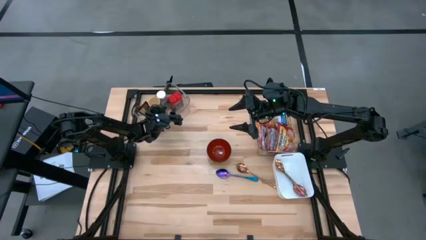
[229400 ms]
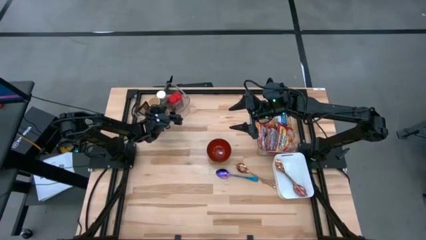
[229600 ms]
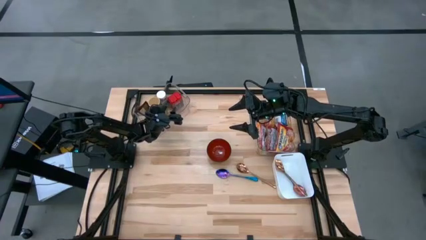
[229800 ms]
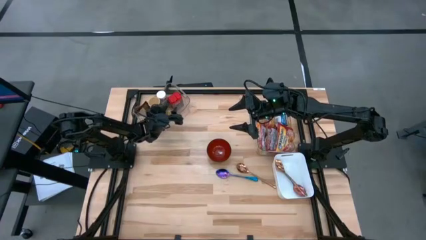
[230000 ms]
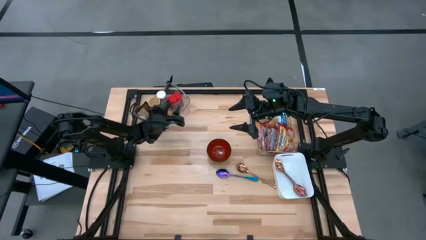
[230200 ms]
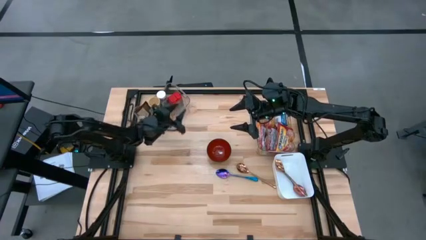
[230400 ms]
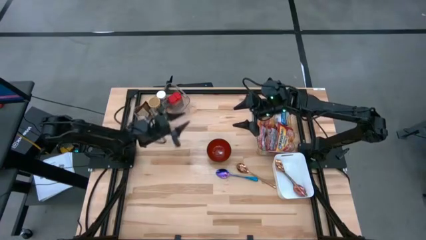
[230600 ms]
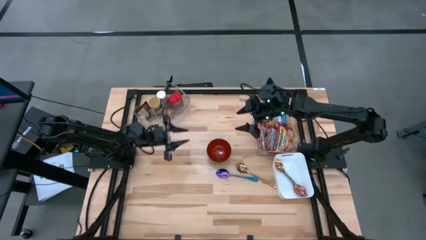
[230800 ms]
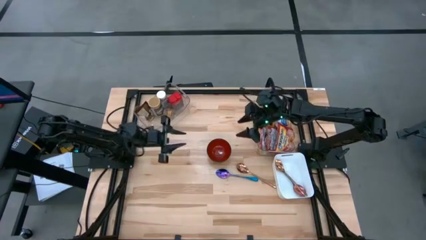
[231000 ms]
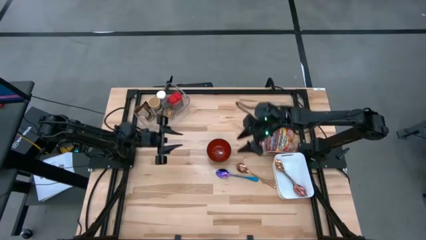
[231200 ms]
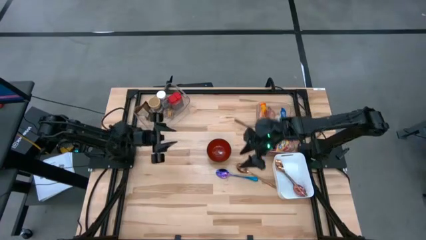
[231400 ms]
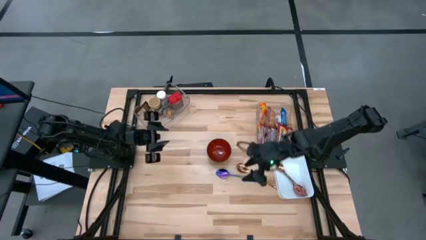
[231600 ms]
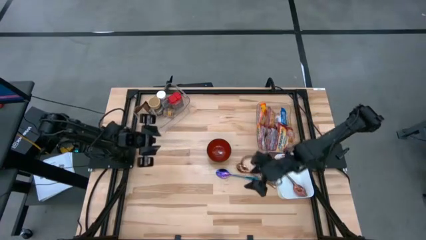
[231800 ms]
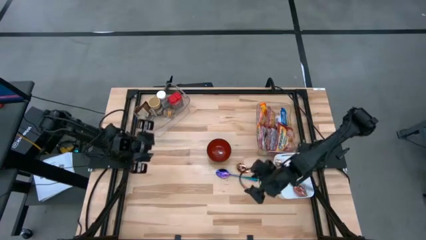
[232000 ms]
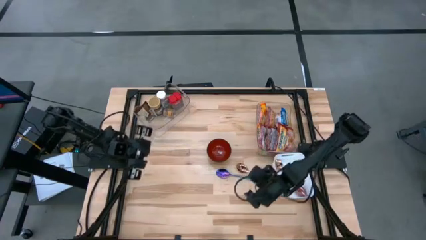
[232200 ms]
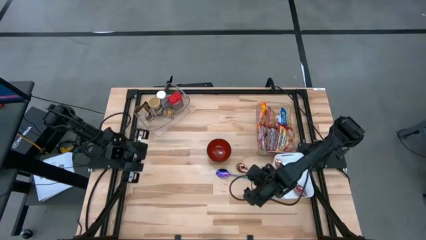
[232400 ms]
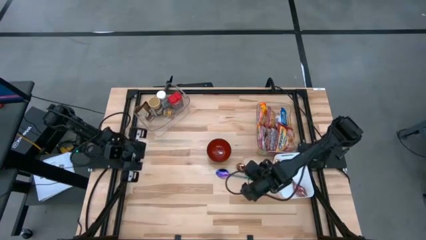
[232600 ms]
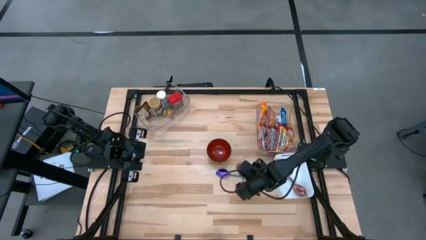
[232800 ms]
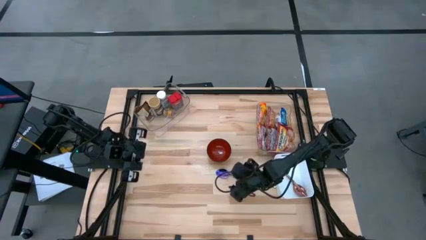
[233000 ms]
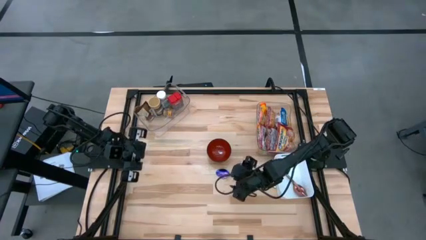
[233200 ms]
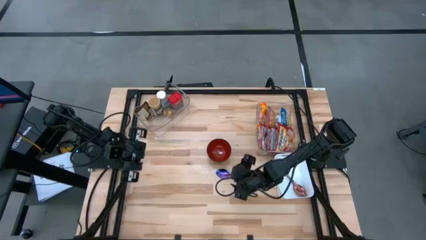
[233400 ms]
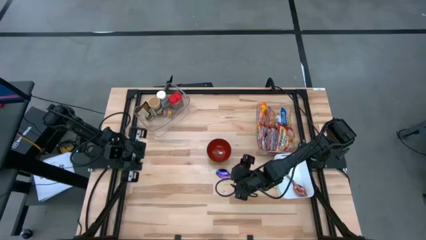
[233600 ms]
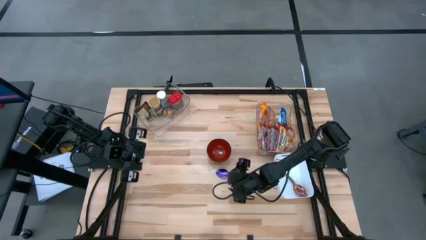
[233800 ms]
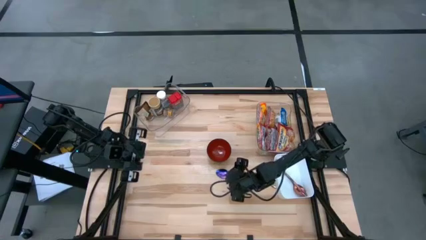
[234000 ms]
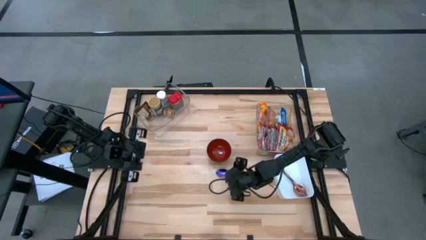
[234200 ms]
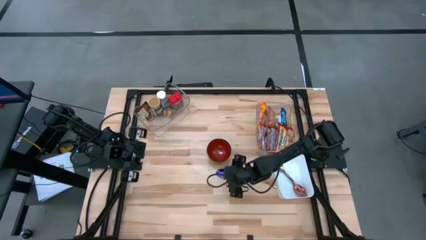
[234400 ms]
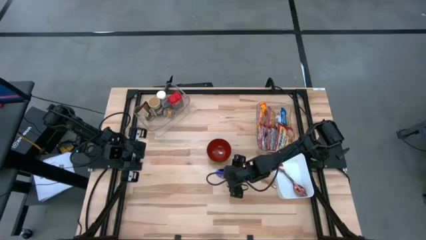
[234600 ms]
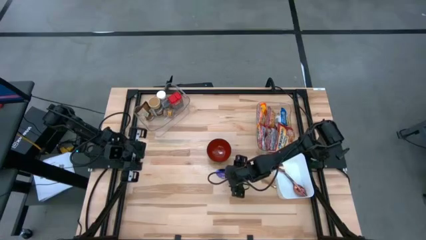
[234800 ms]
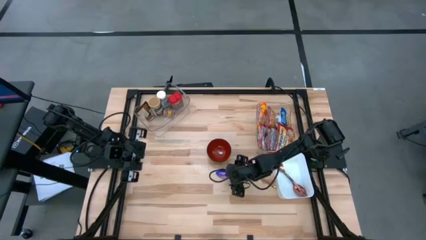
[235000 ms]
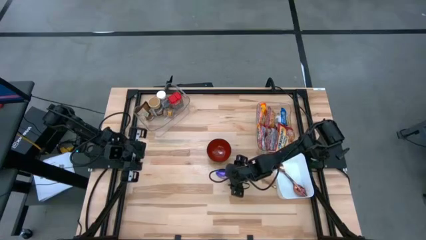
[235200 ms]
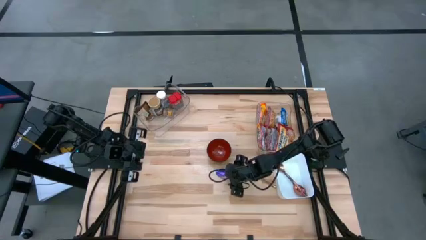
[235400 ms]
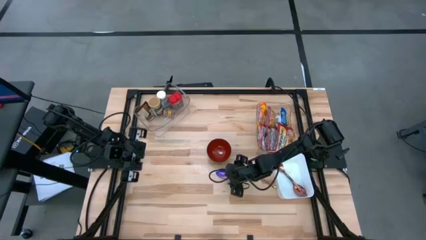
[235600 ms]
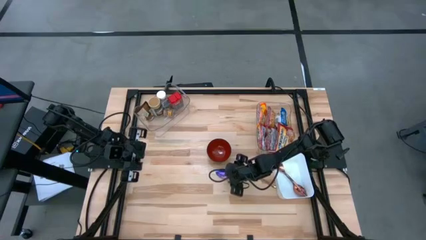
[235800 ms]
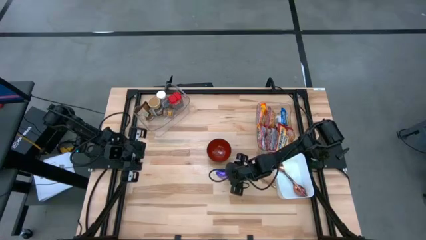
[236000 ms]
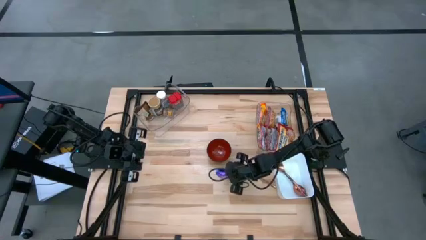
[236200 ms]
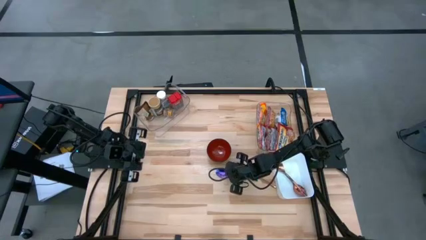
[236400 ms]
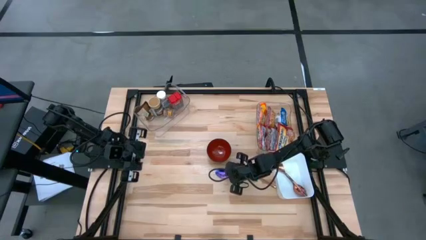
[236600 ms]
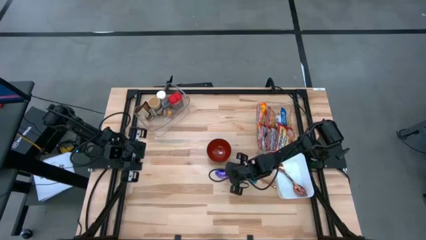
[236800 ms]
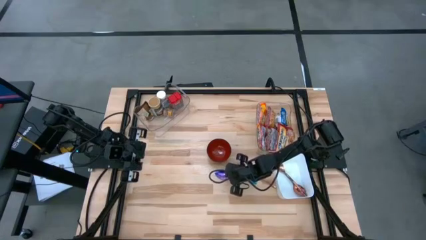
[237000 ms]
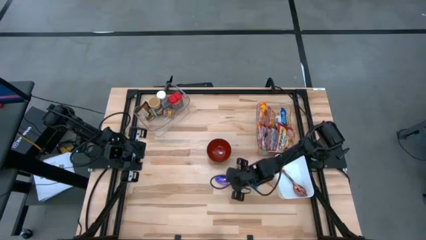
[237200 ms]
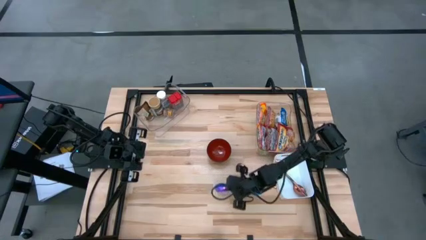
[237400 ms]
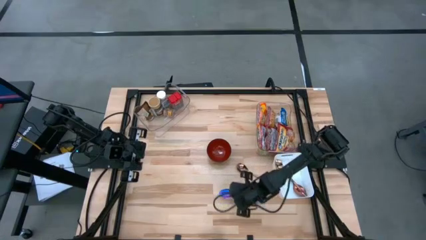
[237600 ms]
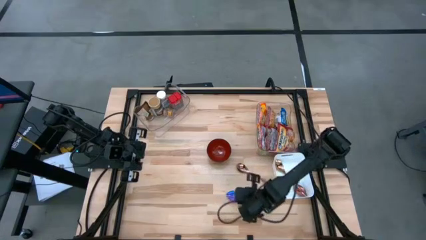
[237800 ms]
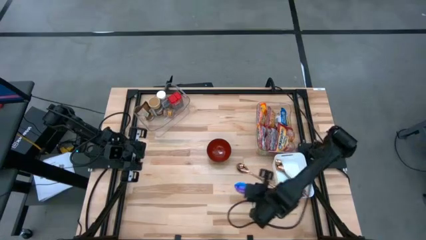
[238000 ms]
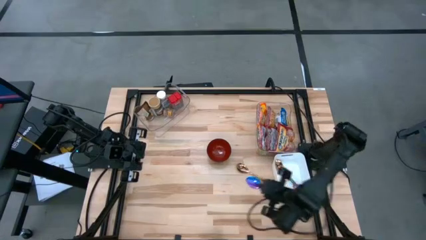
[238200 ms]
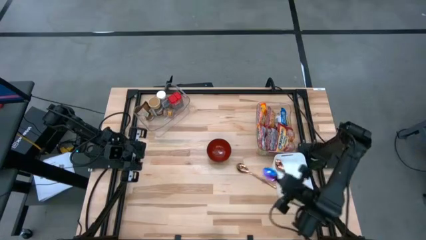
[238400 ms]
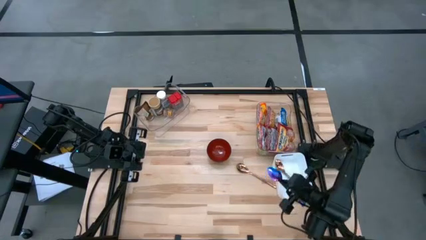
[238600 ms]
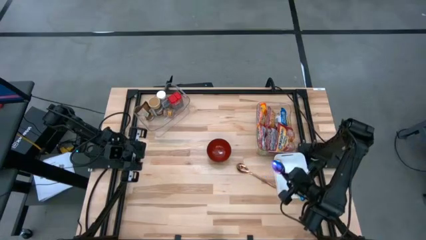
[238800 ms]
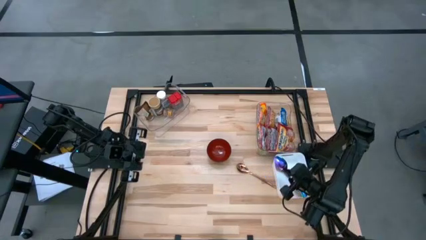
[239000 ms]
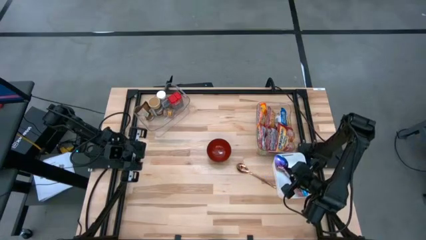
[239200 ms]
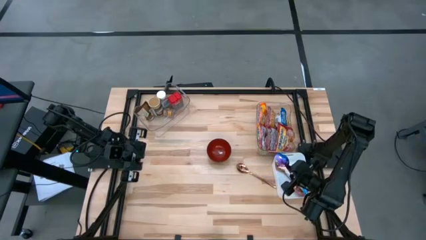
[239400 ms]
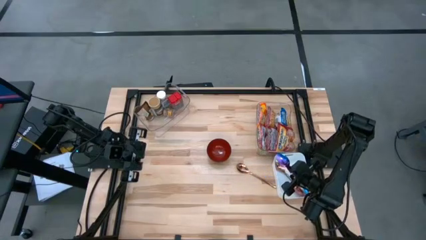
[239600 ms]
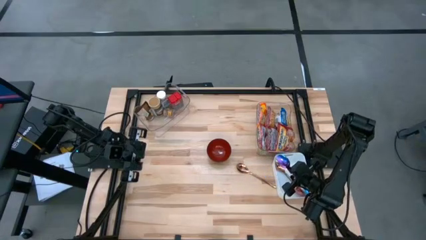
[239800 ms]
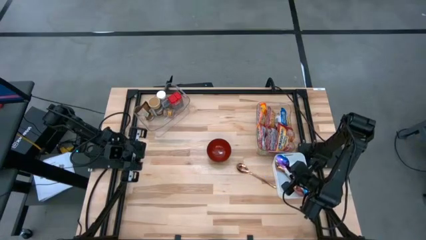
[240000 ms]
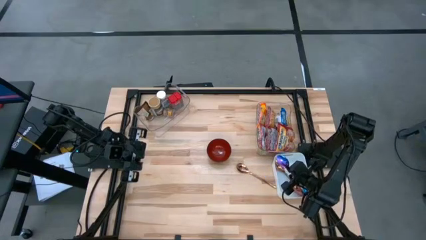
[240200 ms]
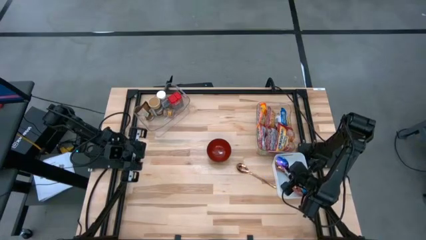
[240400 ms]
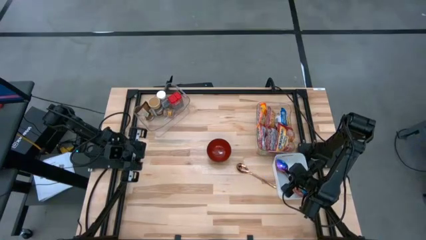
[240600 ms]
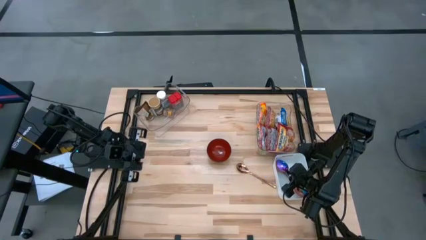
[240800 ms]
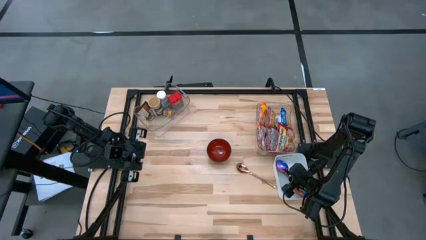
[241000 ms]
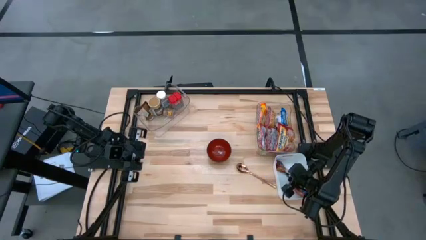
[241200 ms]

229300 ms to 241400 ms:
Task: Pick & Place Food Item
Put the blue spoon into the white bin

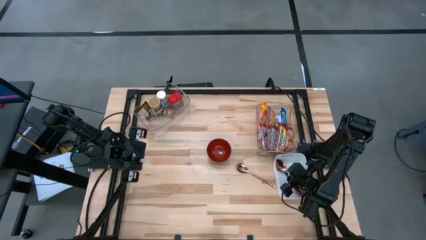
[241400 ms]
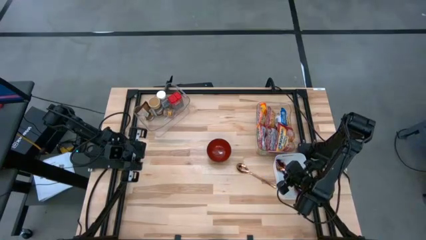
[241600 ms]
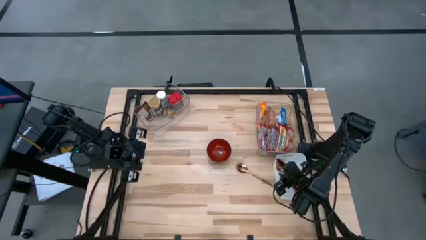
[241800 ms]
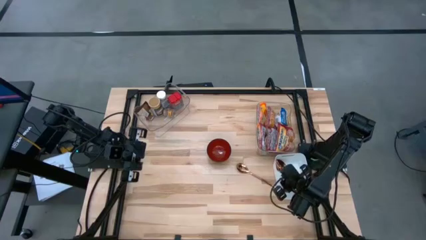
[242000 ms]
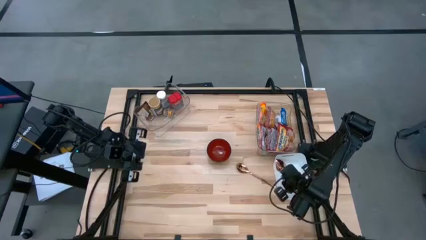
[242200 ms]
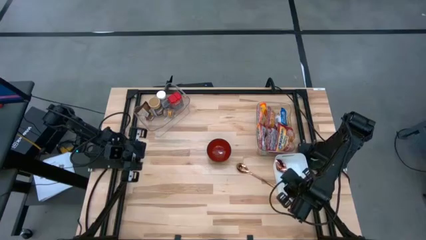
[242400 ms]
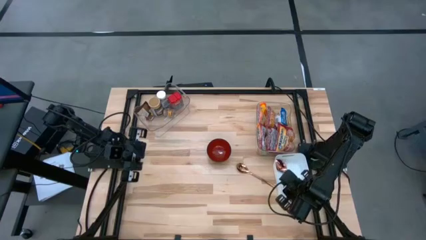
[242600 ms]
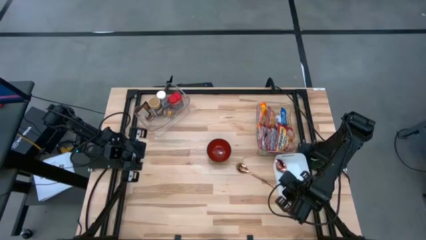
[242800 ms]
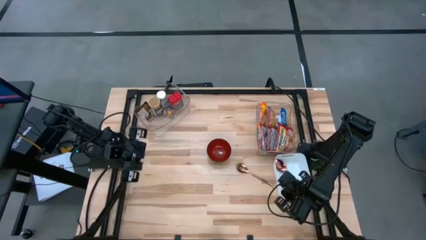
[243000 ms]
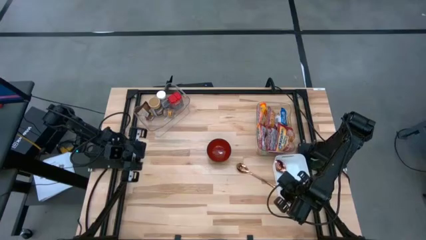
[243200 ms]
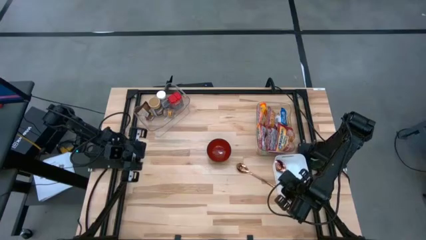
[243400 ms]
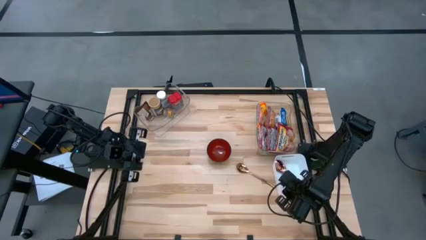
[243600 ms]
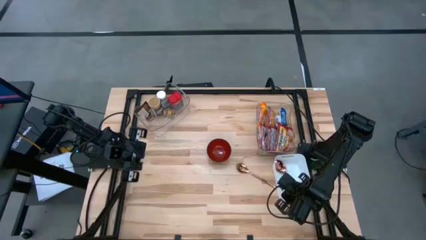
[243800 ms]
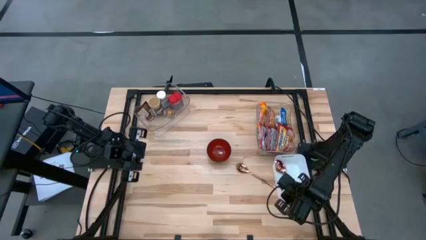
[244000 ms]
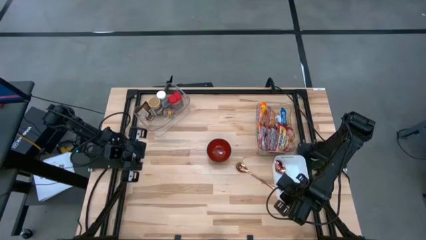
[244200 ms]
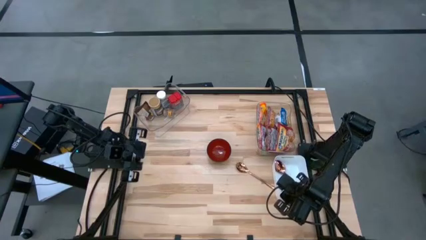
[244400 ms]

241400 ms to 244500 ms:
Adjust the white bin on the table

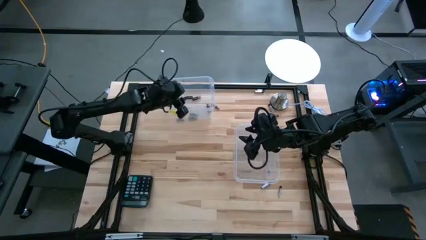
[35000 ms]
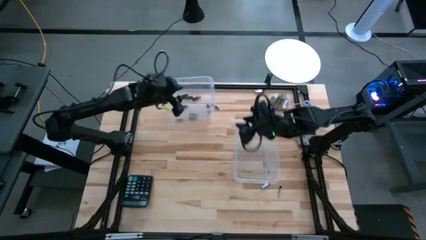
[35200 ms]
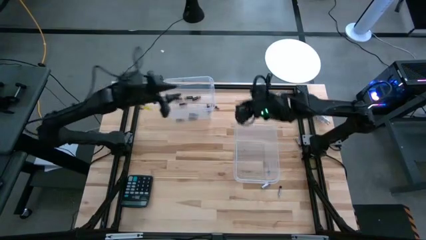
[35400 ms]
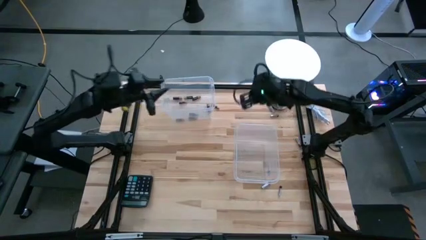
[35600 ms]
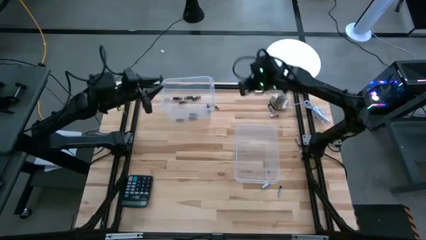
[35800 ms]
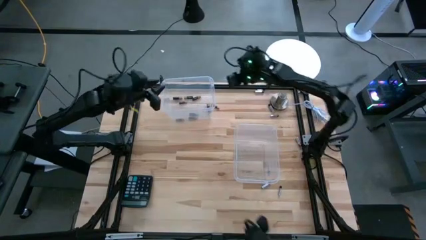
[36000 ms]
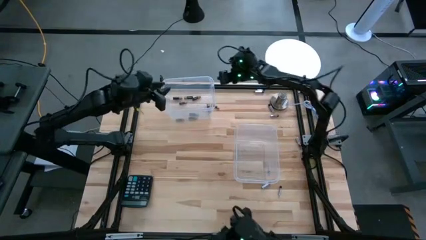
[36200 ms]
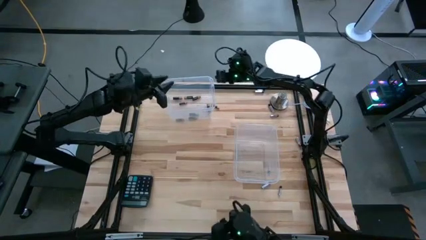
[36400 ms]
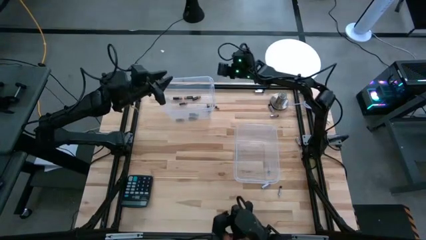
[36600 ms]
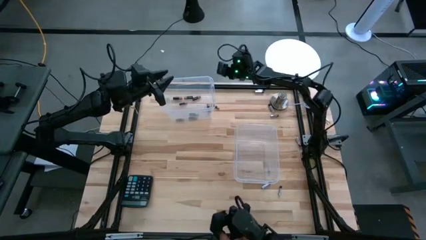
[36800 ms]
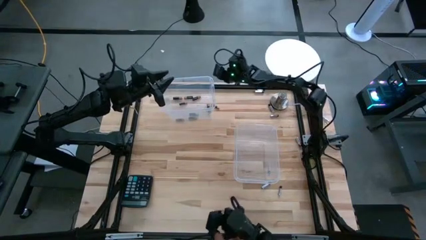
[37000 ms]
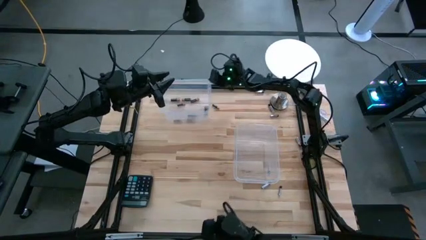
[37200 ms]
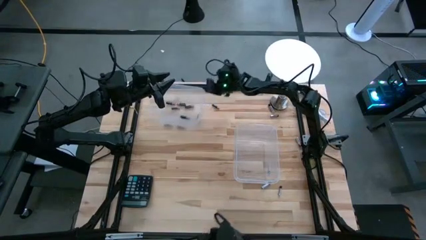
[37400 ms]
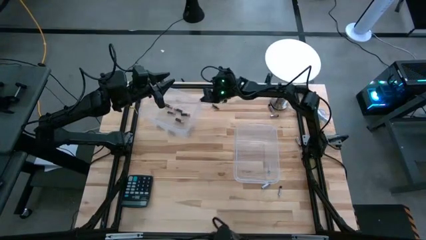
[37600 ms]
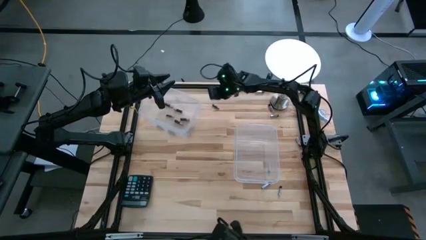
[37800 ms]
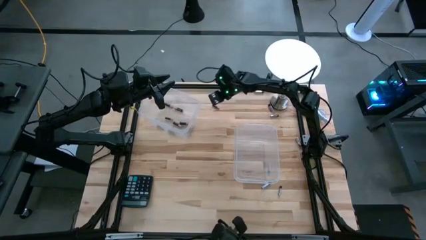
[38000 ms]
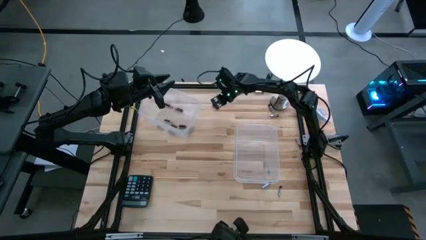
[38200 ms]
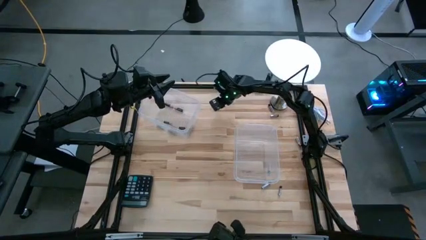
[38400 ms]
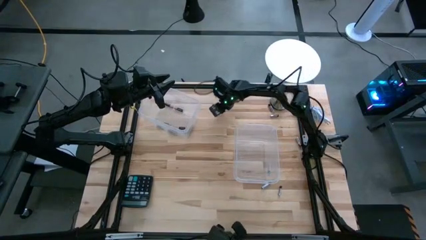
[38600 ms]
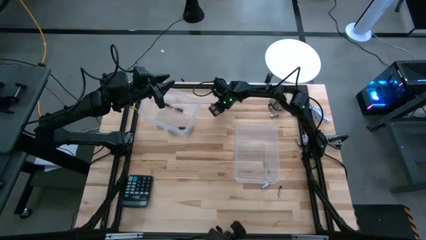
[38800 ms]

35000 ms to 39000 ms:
Task: Sort batteries
Put the black battery into the left transparent bin
